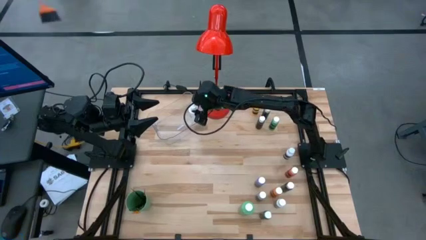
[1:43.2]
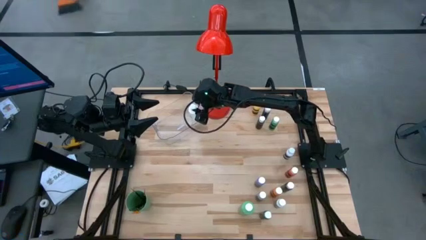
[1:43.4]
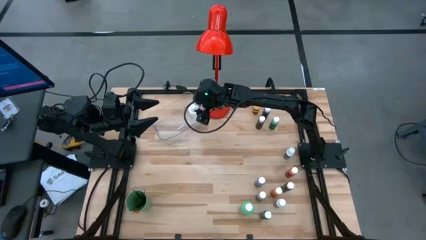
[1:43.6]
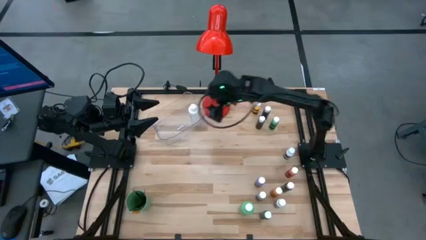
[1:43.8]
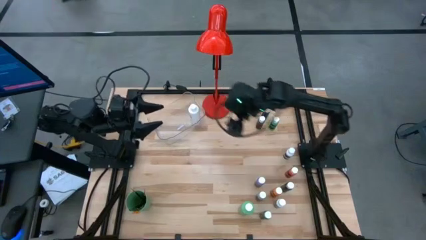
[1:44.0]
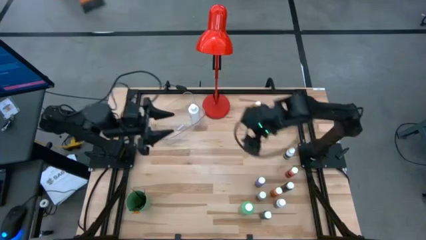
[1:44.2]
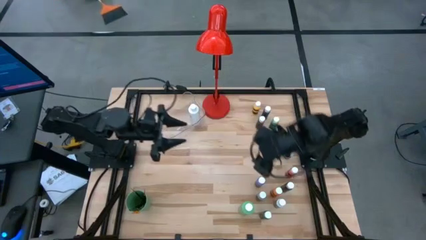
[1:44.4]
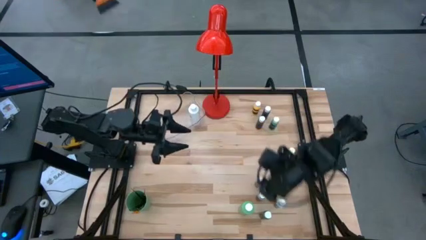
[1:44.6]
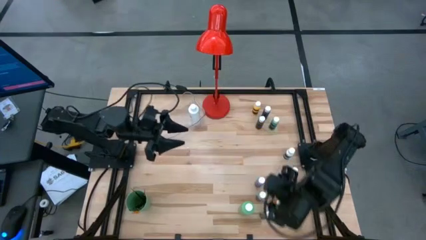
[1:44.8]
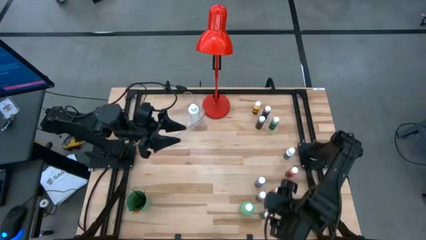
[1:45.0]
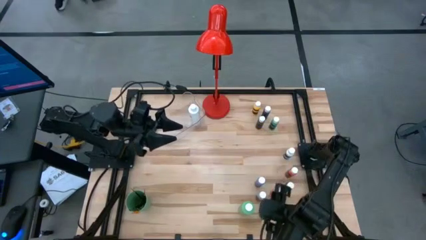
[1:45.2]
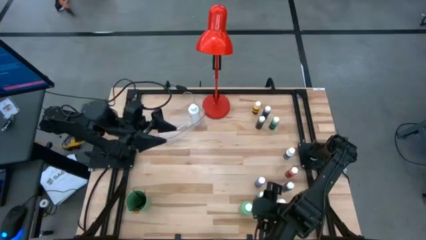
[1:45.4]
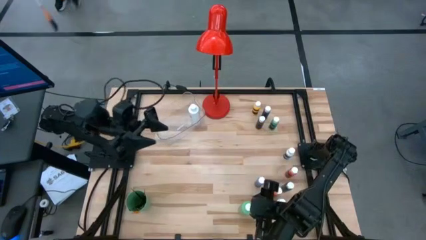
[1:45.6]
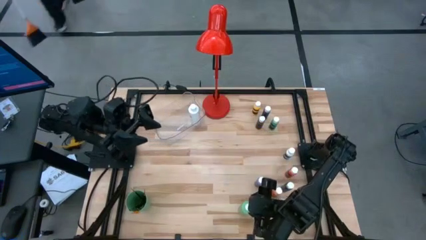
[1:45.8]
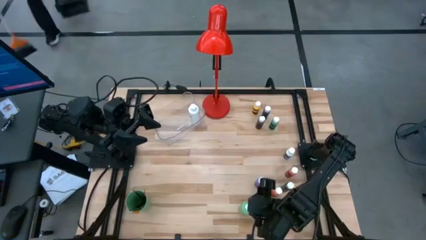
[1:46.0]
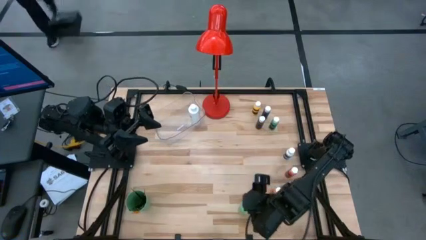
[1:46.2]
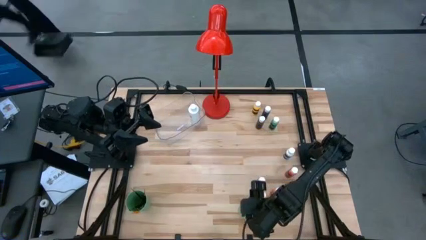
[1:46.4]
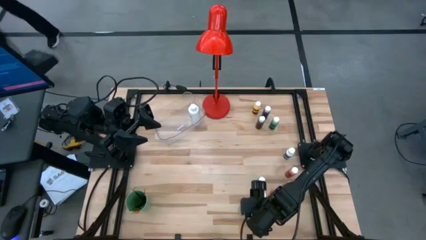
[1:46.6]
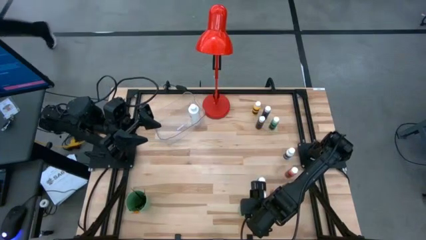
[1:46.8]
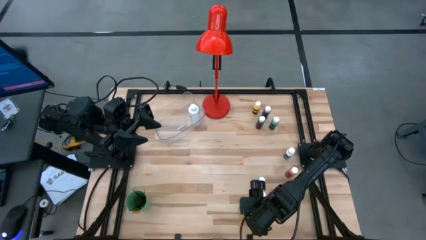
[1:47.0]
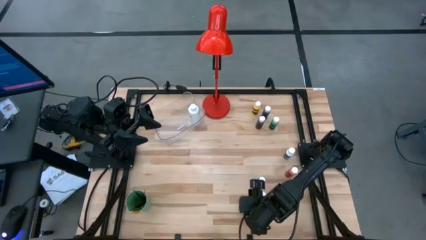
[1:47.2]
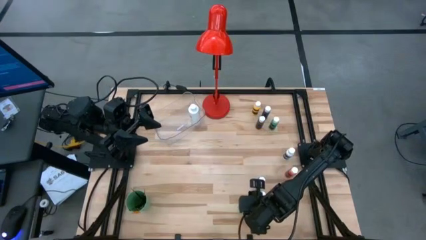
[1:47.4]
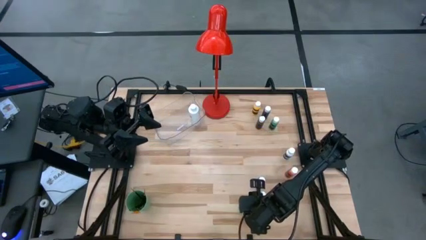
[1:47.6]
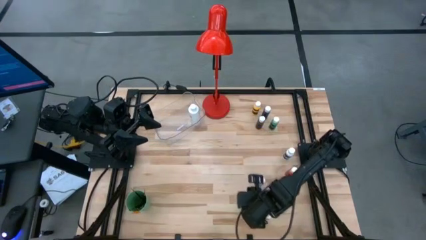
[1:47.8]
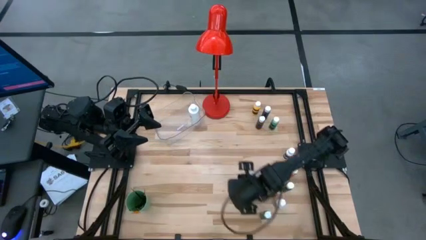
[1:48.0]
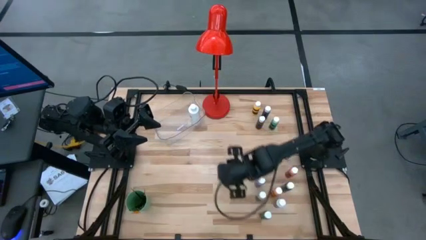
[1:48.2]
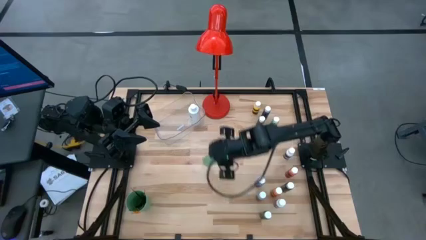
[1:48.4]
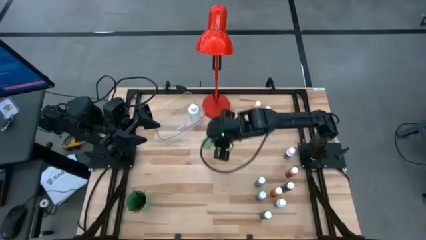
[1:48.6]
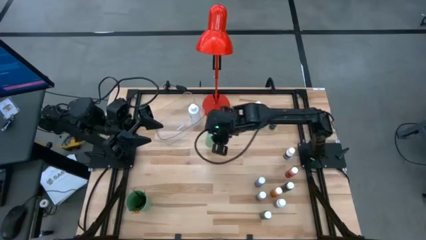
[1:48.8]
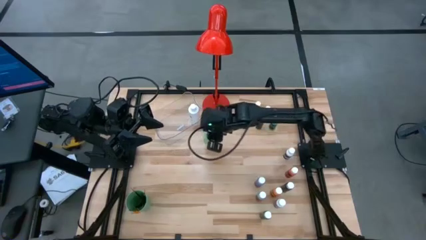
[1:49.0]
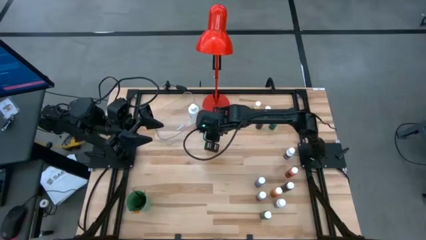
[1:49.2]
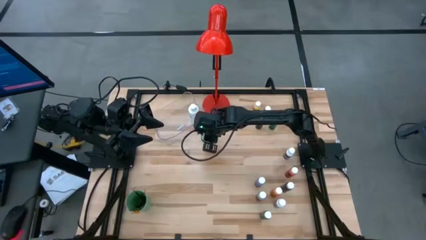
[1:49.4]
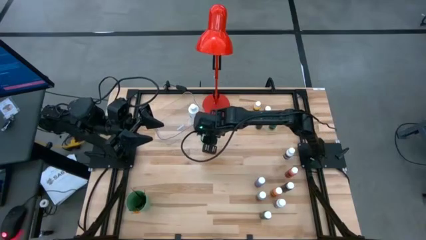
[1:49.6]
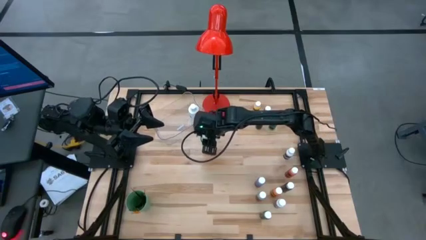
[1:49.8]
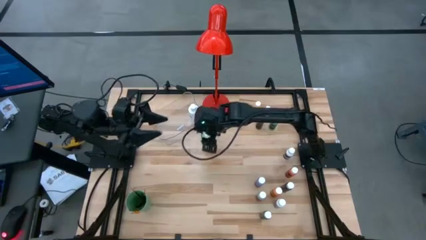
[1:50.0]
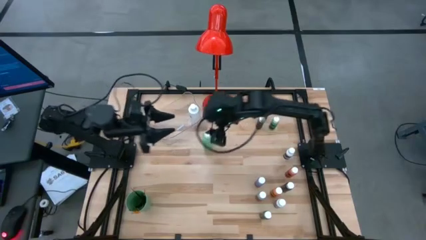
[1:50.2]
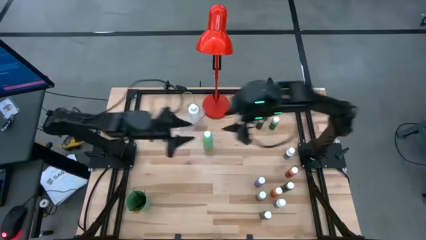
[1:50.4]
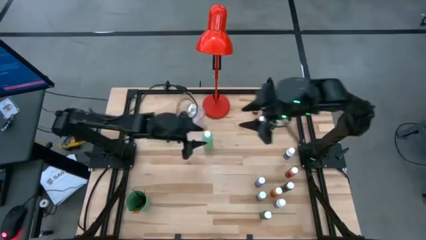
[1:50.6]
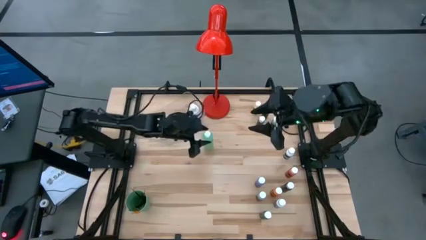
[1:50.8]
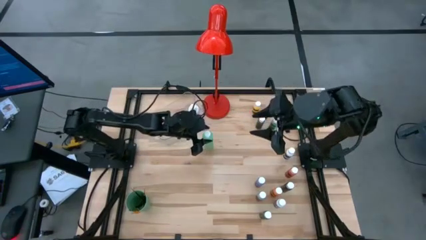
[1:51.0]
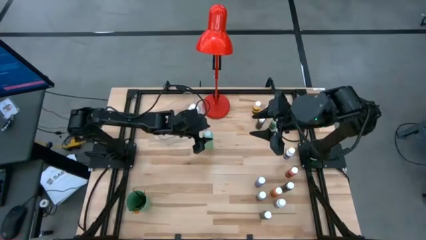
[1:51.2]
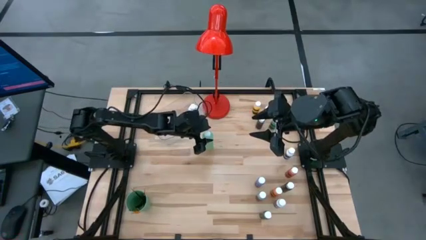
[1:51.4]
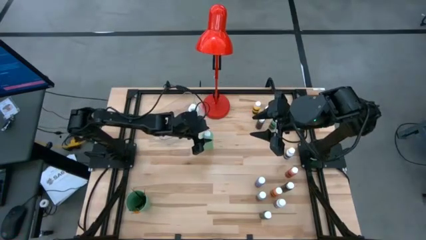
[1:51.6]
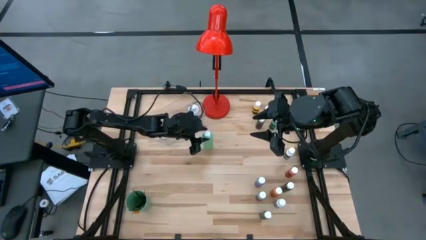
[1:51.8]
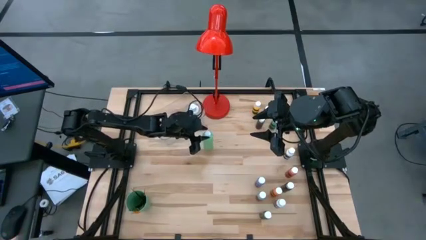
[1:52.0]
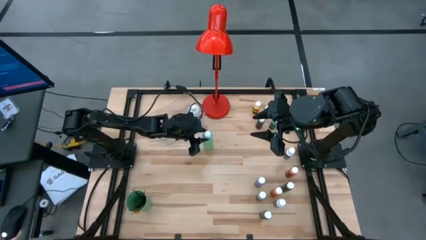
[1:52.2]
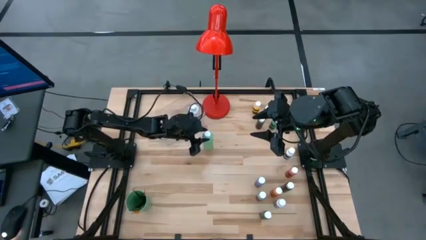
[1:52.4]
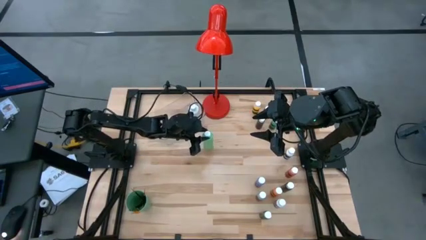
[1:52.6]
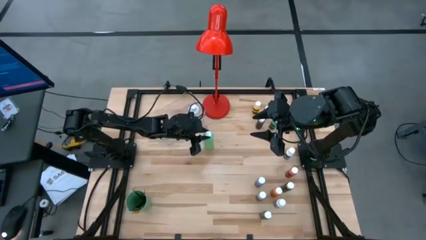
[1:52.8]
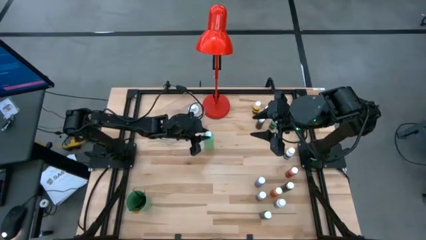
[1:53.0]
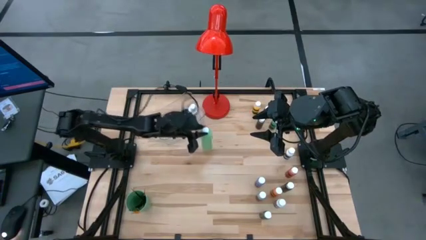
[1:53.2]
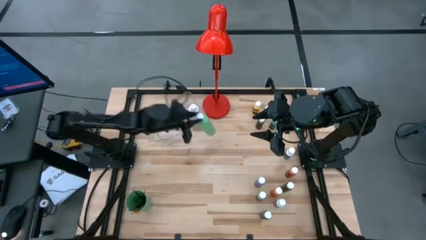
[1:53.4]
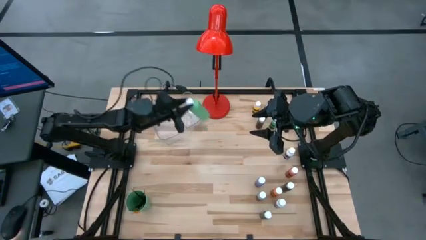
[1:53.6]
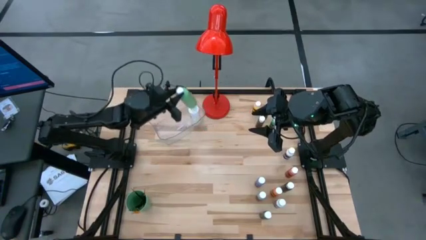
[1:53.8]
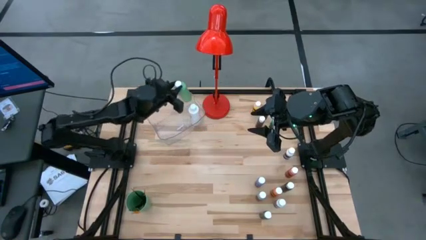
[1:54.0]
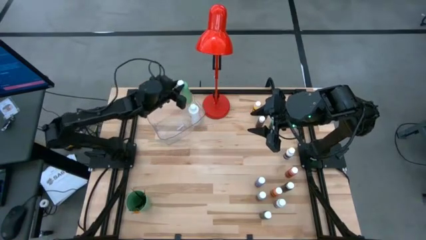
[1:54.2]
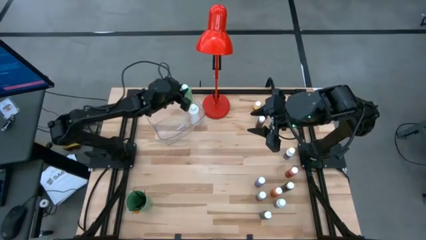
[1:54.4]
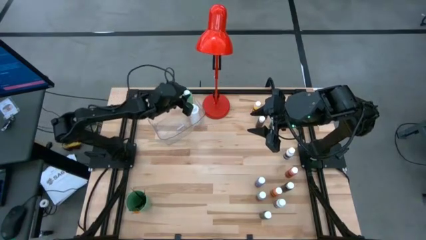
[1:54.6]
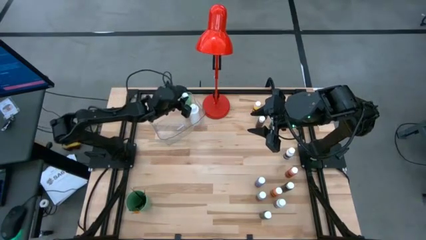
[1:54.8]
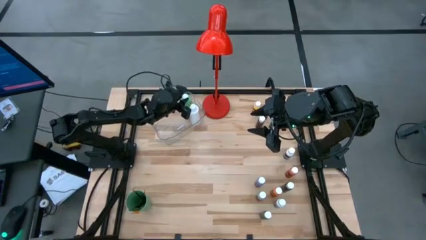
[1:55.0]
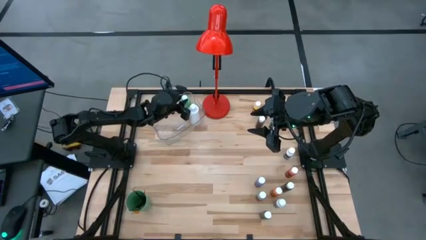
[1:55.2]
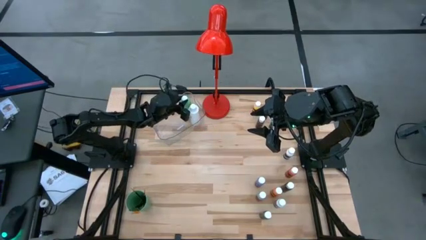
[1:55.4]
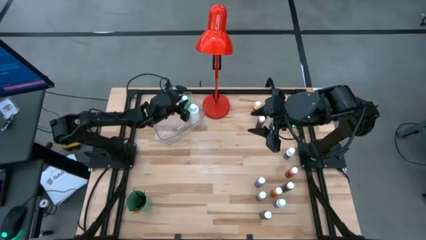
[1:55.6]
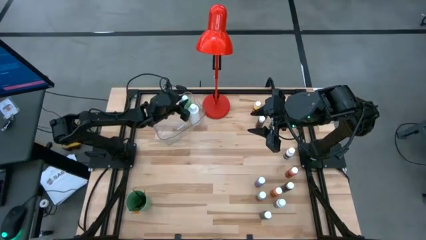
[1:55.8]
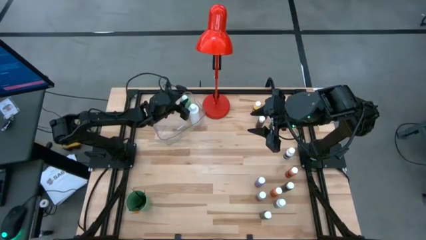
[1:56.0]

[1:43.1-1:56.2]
Task: Pick & Place Paint Supplies
Put the green paint bottle into the transparent bin
